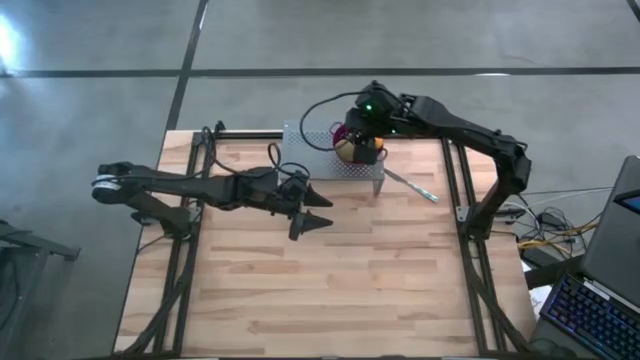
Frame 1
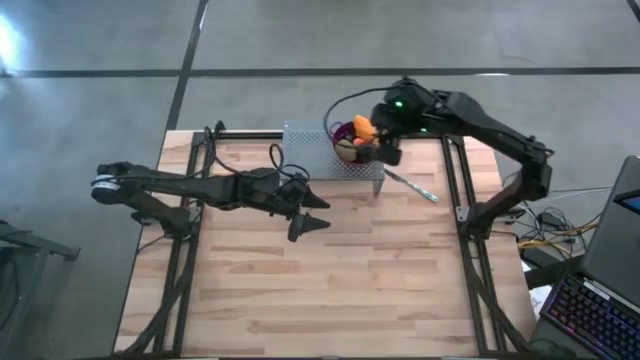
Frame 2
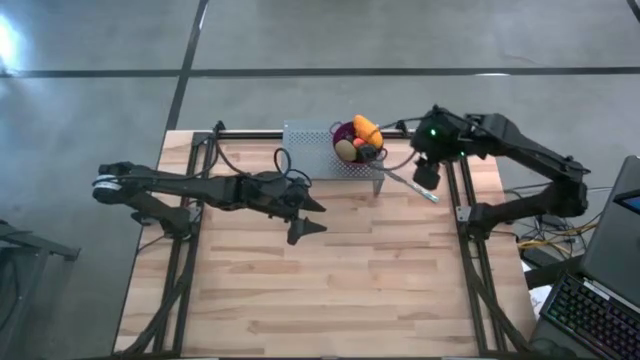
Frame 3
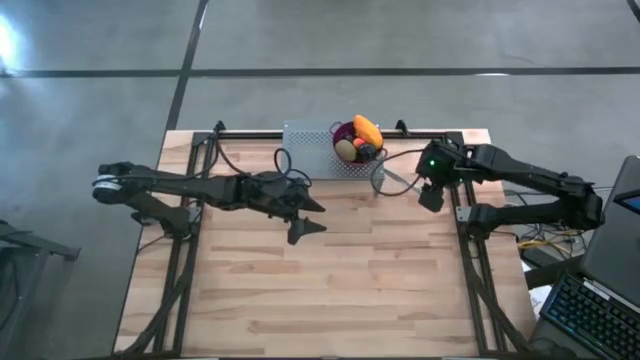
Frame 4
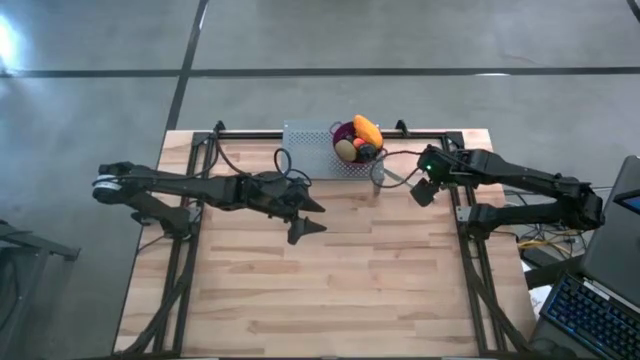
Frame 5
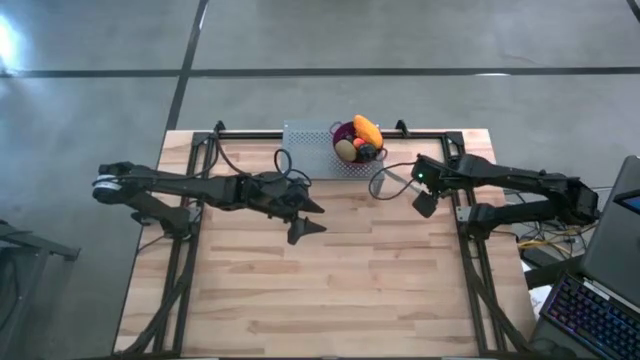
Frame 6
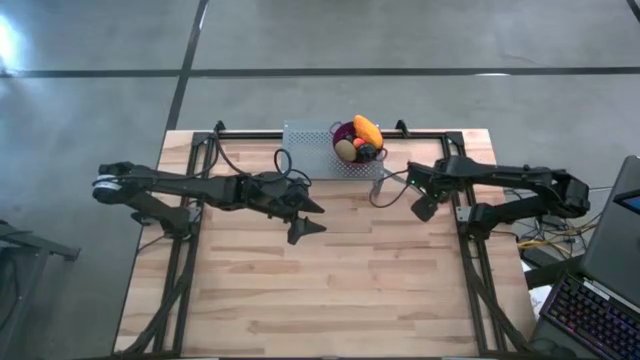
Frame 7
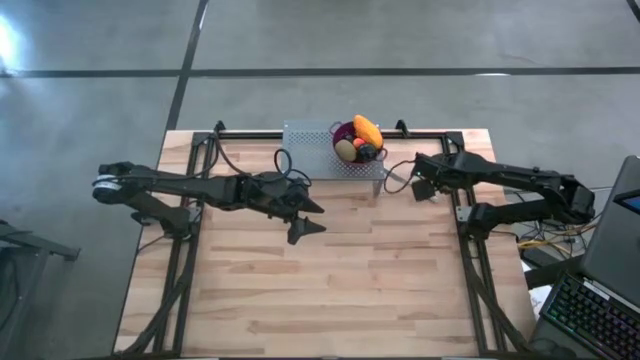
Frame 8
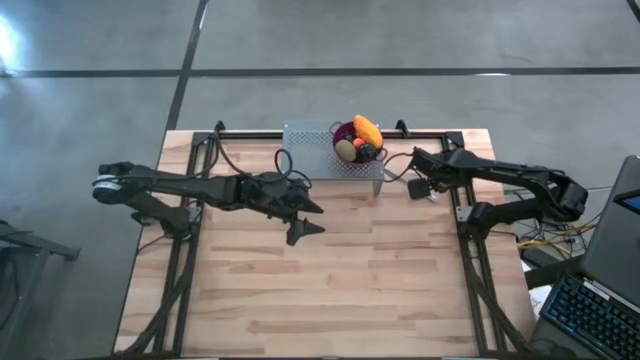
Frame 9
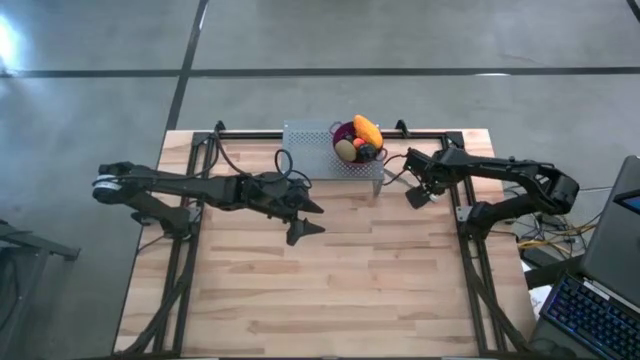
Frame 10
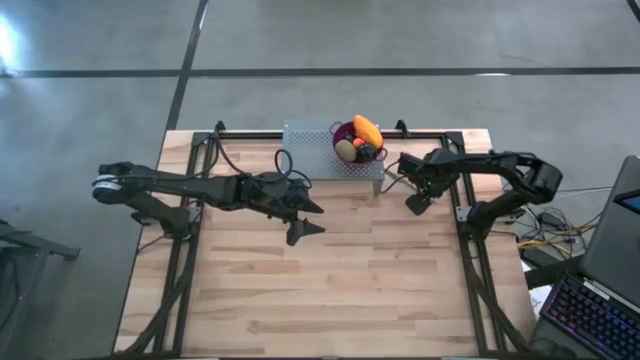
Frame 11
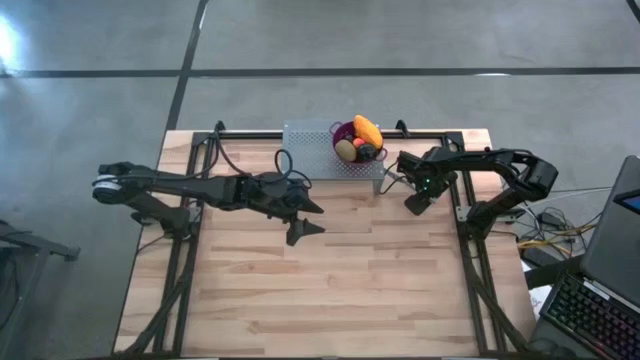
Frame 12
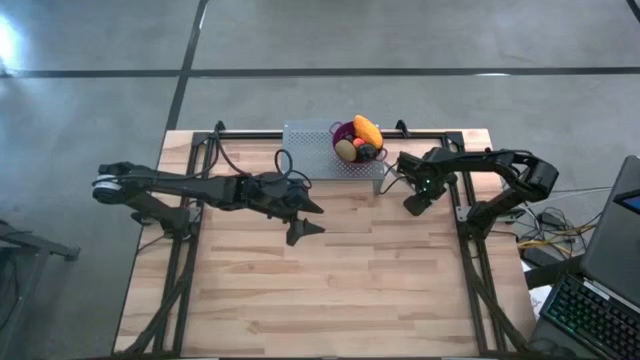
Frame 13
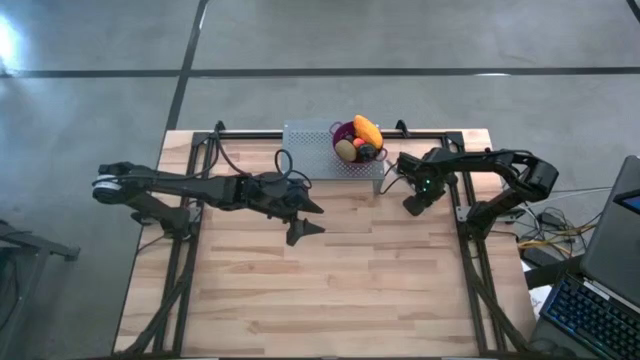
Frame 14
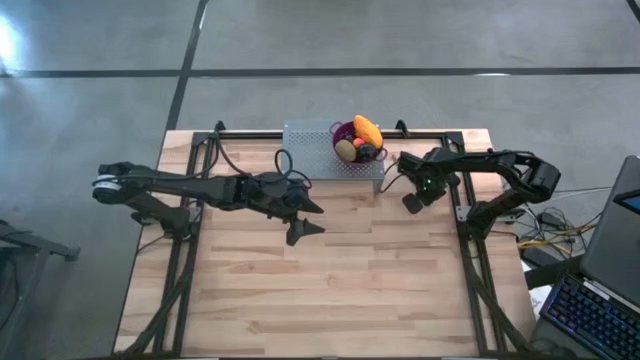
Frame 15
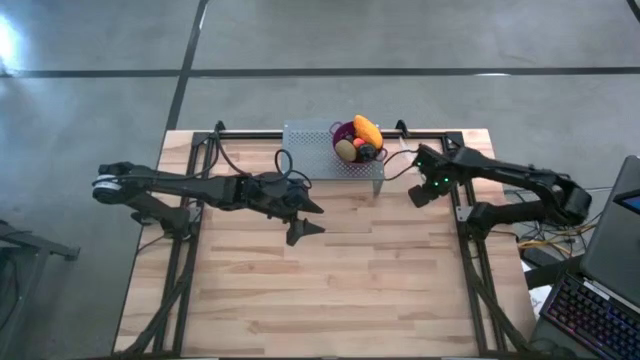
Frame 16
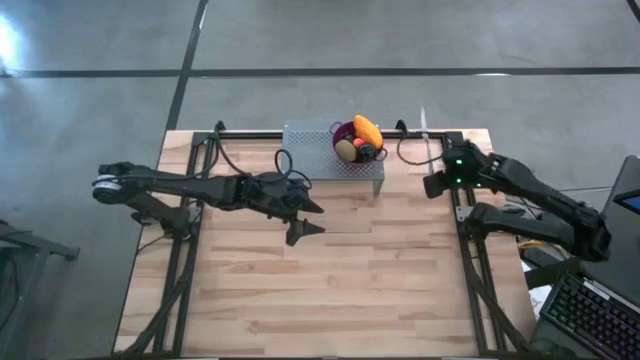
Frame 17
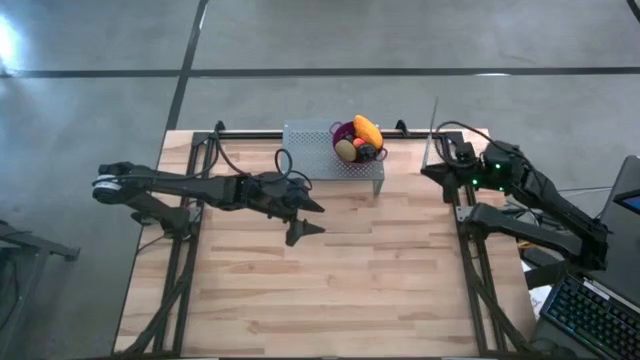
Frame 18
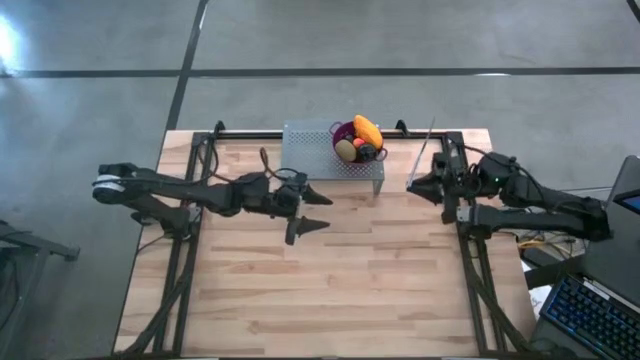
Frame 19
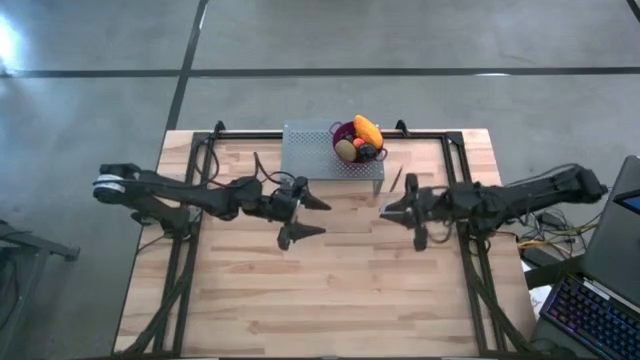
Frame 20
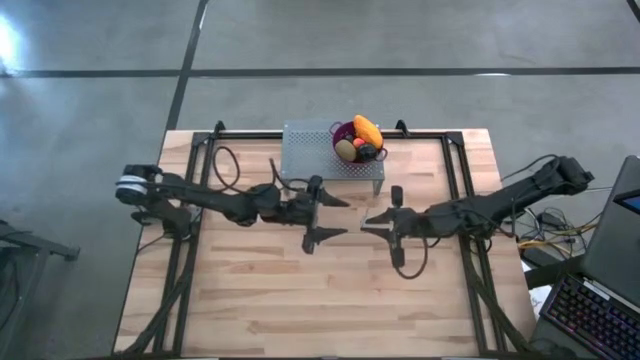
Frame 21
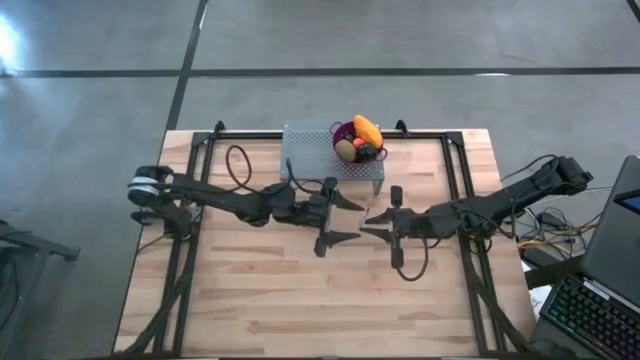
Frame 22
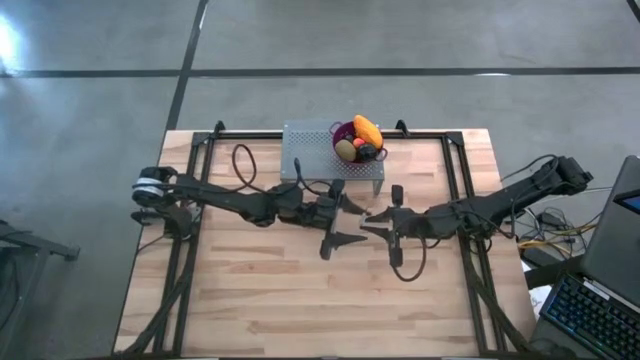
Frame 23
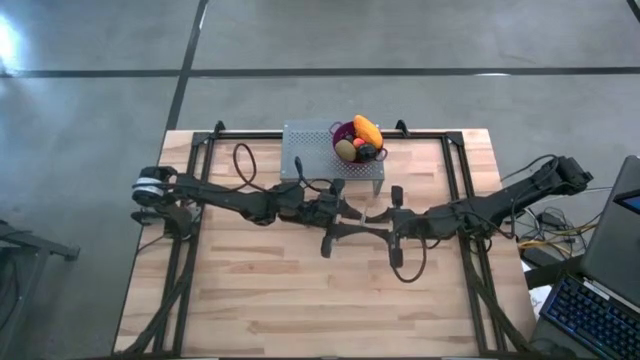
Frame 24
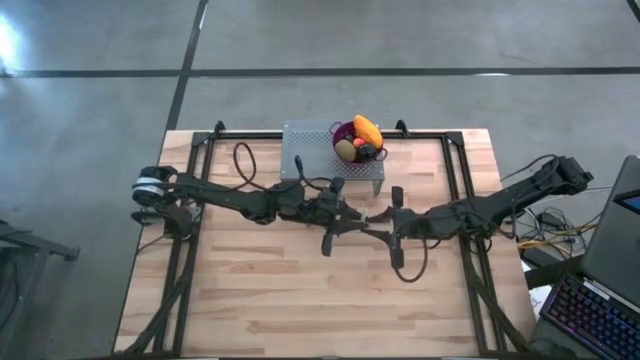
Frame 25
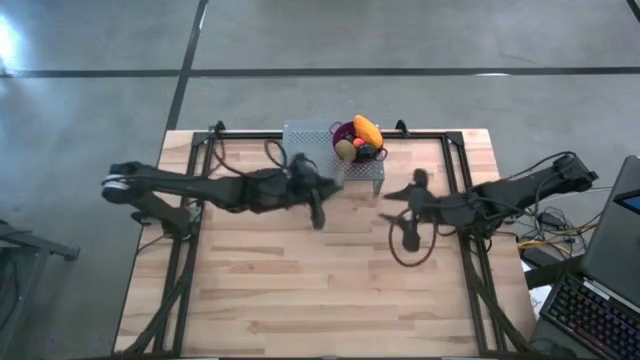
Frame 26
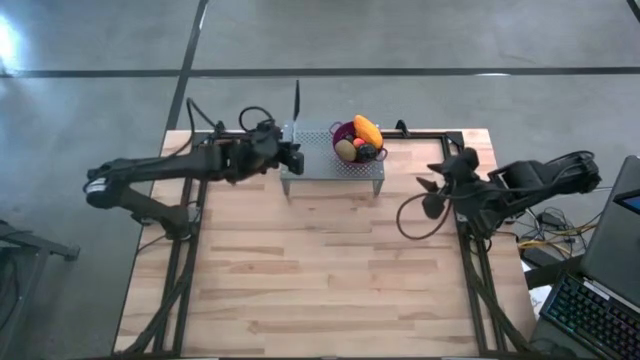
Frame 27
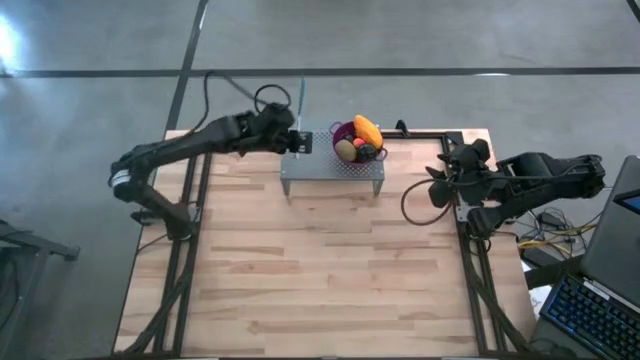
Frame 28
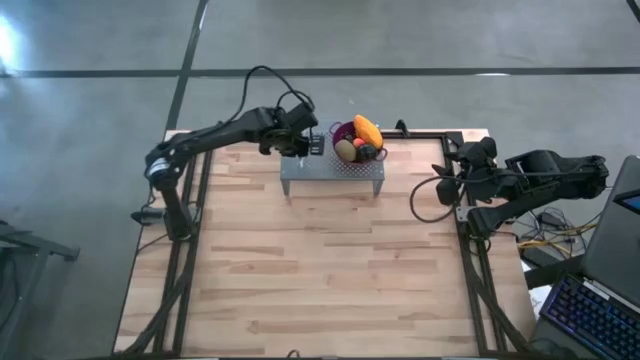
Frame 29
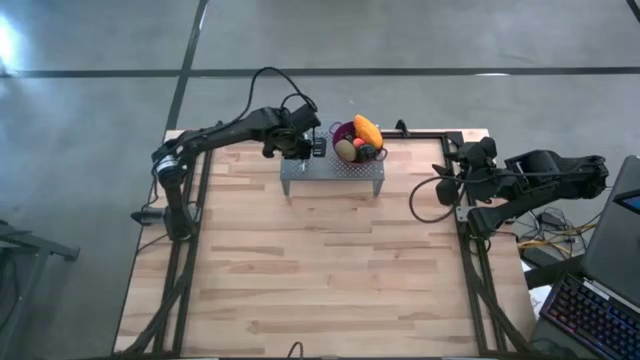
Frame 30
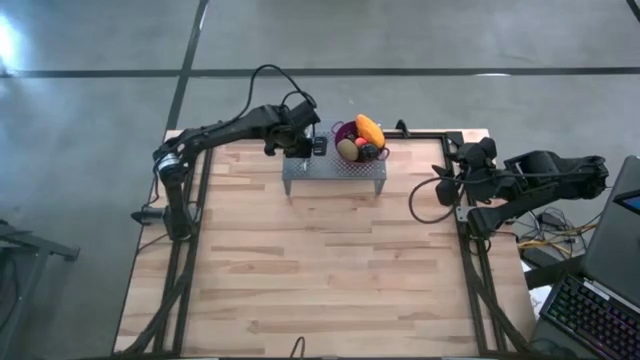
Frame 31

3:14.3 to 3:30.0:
Task: Pick & Place Fruit
Put the table knife on the shelf

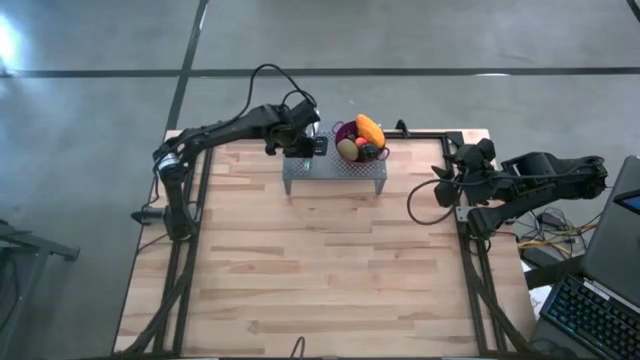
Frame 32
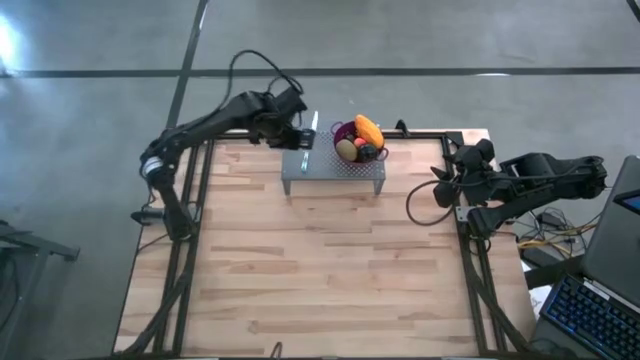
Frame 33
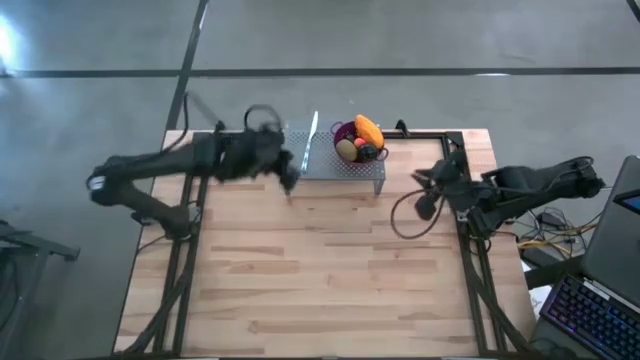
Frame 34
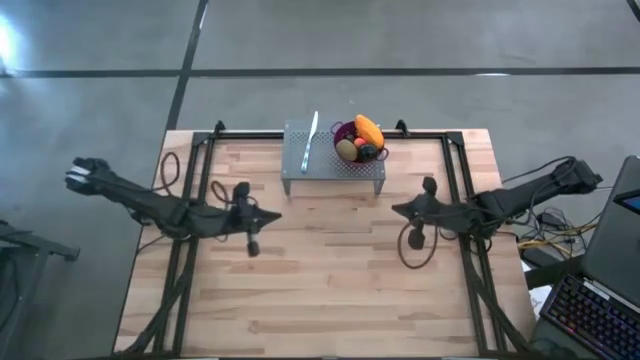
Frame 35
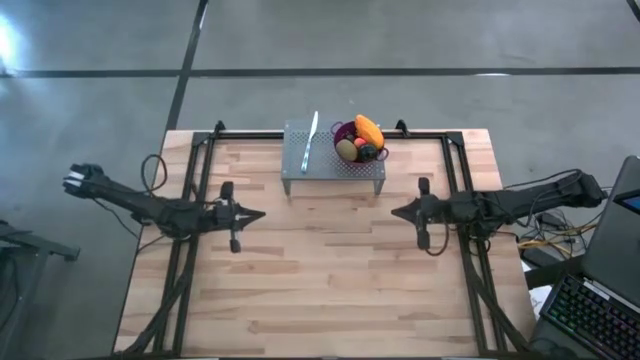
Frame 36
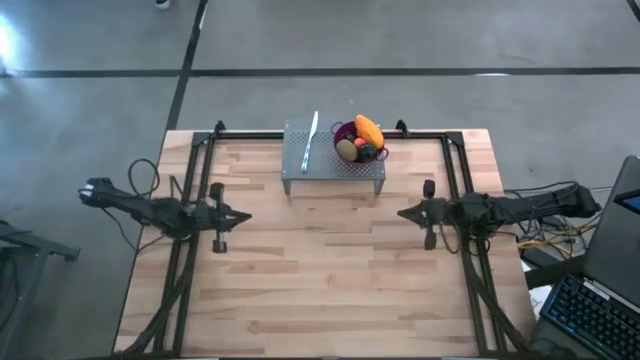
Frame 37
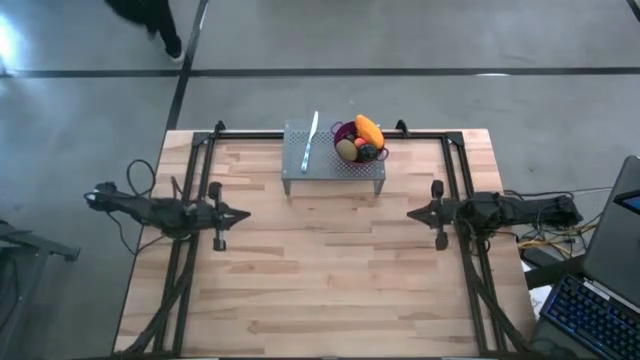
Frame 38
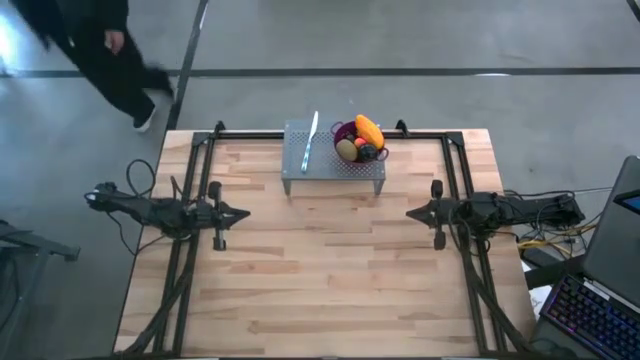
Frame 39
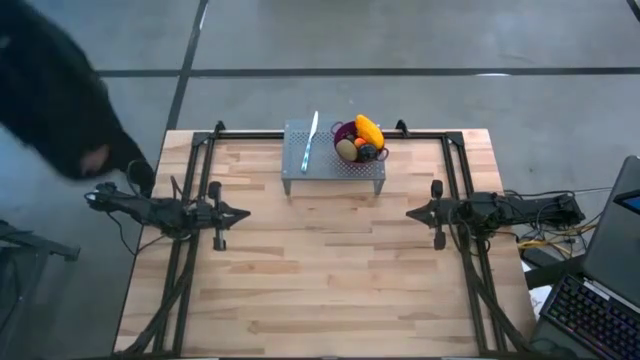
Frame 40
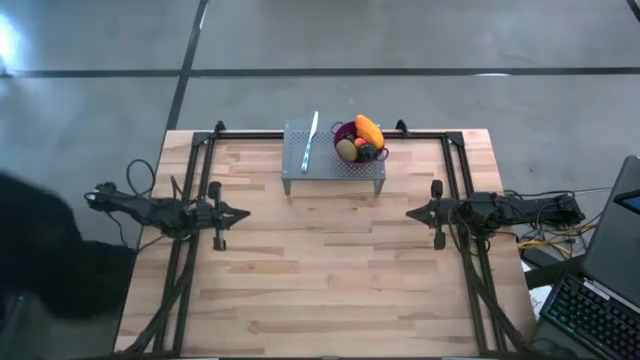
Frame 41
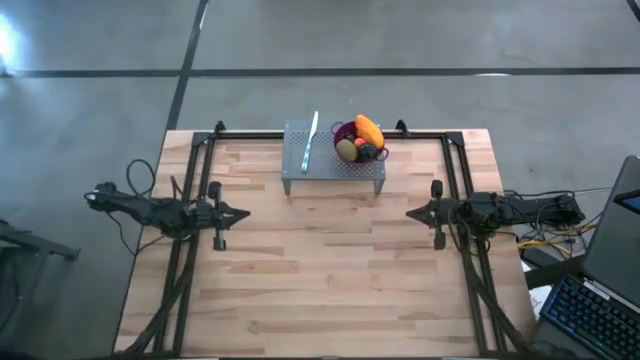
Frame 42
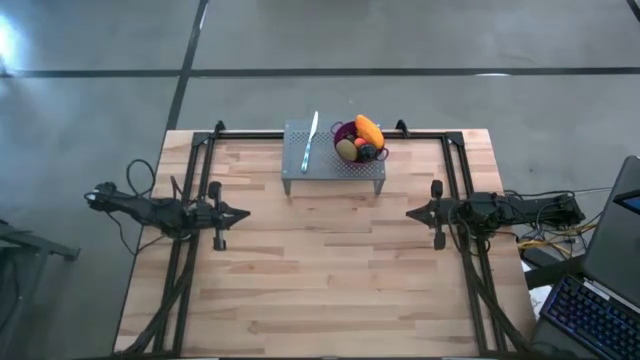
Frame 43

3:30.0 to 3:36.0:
Return to Home Position

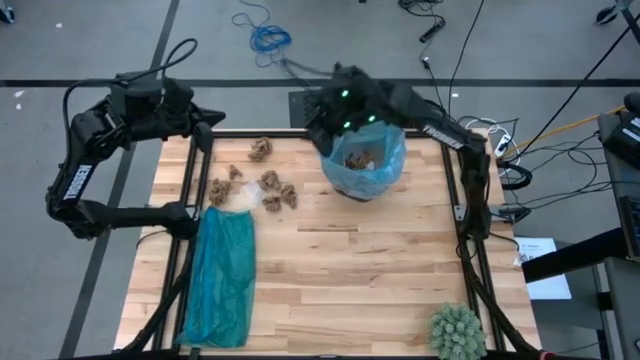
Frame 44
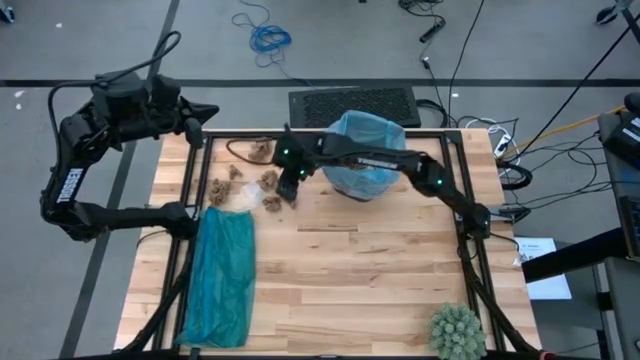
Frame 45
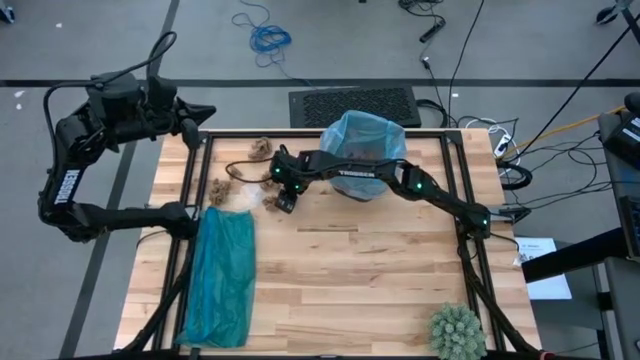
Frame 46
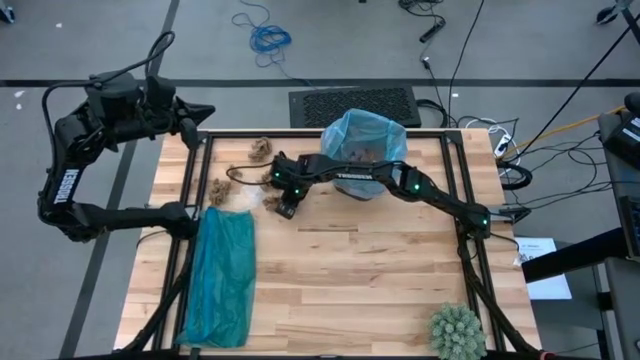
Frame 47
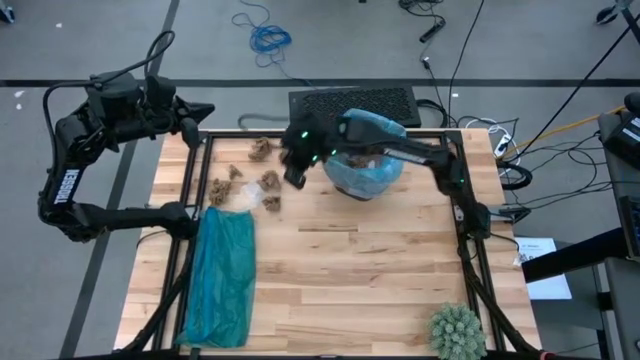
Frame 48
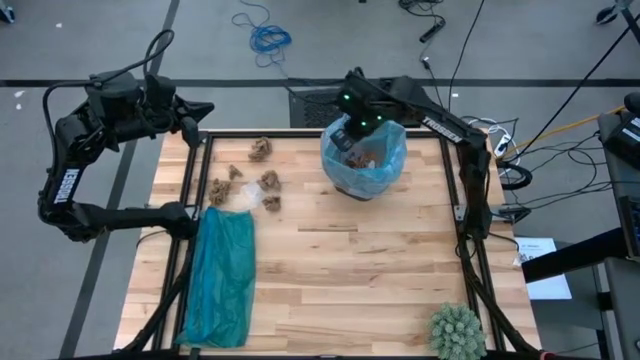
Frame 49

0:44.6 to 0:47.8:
Task: place trash/remove bag and relplace
Put the brown napkin into the trash bin
